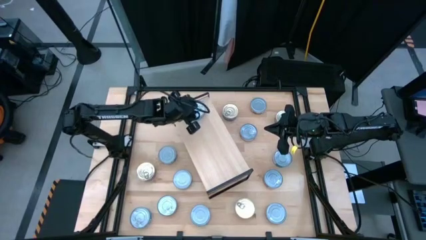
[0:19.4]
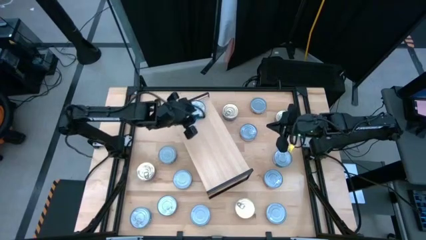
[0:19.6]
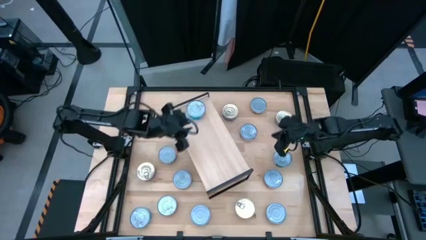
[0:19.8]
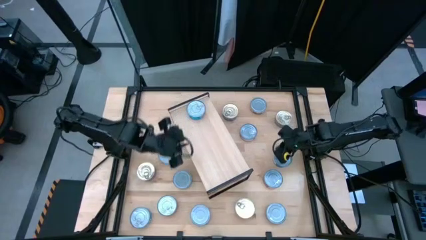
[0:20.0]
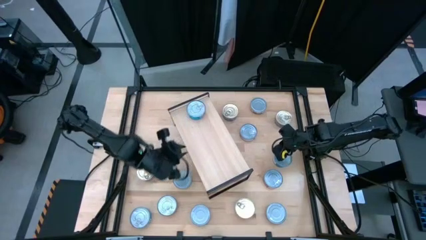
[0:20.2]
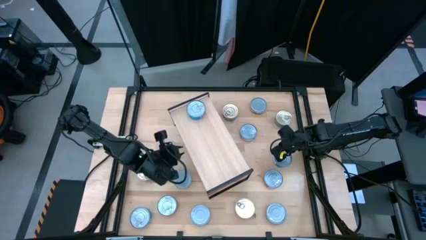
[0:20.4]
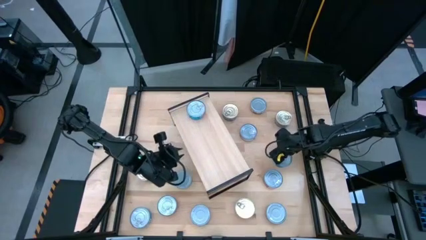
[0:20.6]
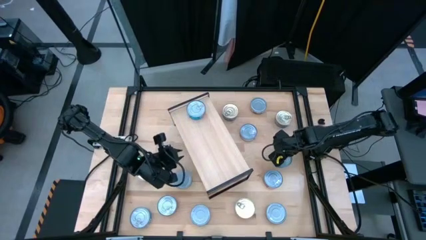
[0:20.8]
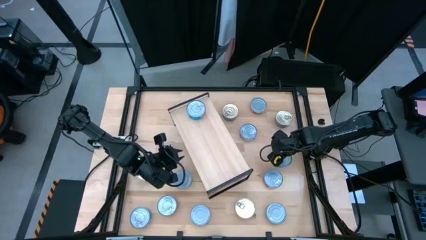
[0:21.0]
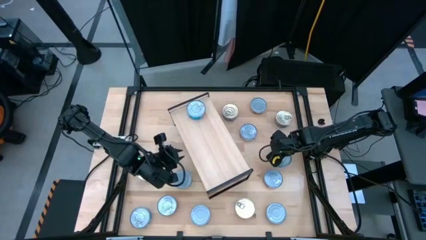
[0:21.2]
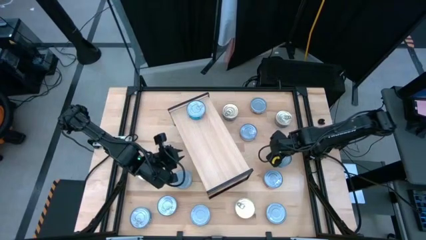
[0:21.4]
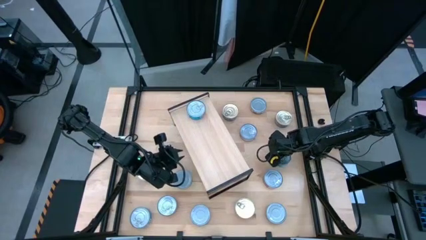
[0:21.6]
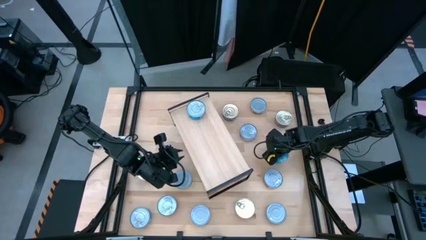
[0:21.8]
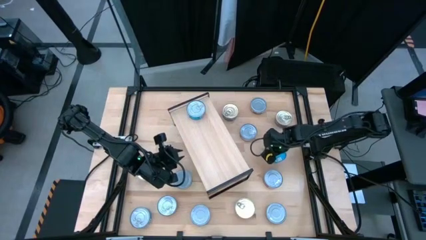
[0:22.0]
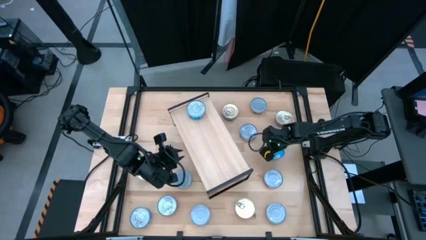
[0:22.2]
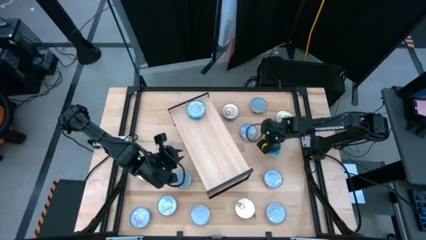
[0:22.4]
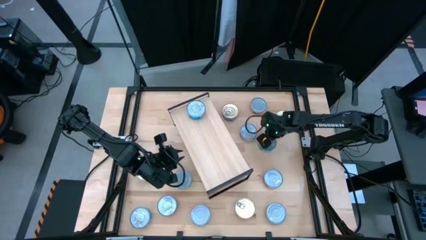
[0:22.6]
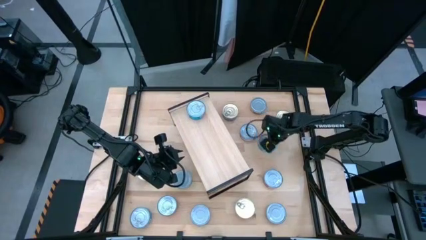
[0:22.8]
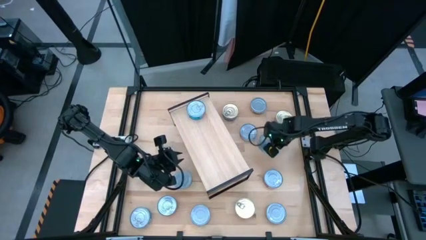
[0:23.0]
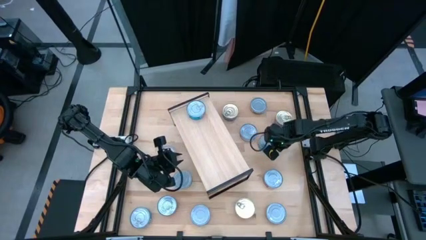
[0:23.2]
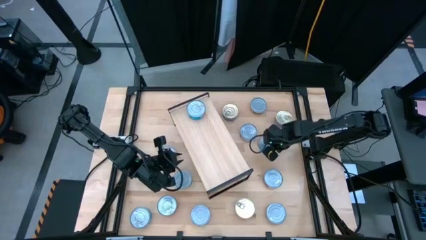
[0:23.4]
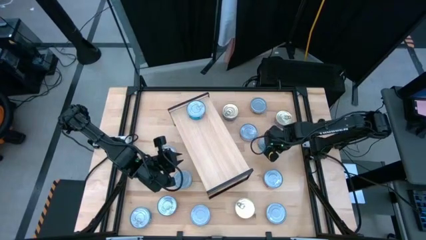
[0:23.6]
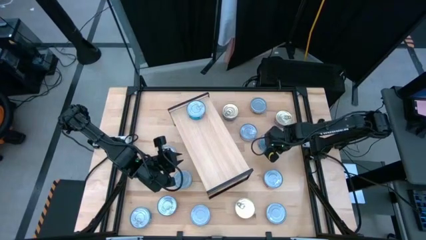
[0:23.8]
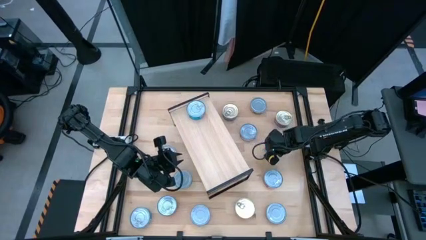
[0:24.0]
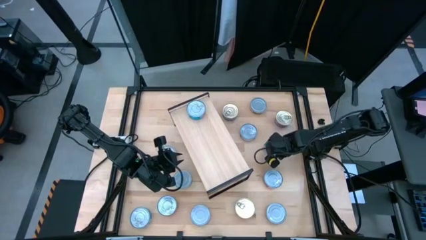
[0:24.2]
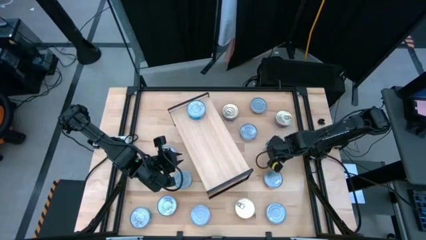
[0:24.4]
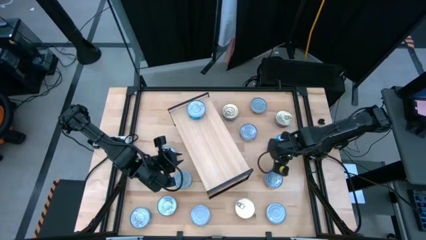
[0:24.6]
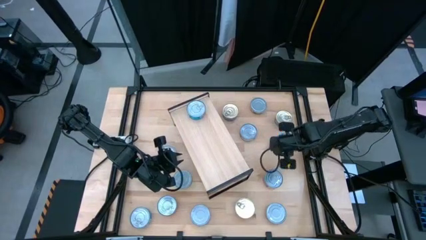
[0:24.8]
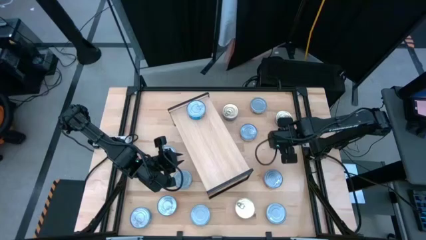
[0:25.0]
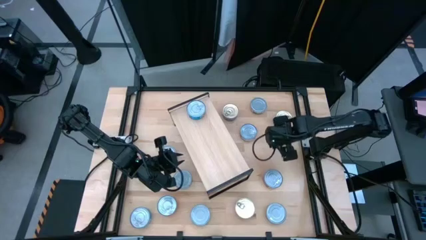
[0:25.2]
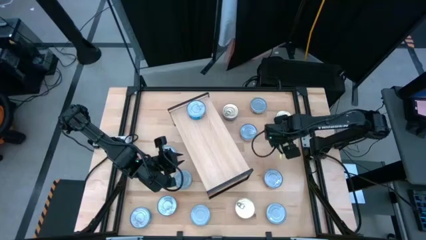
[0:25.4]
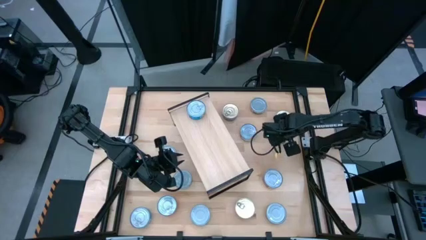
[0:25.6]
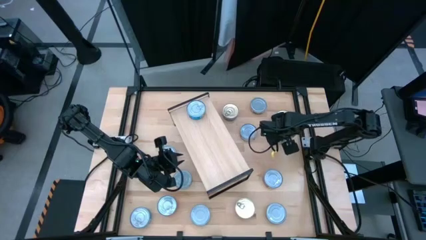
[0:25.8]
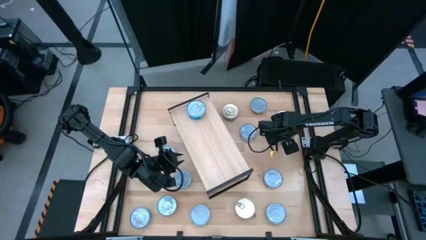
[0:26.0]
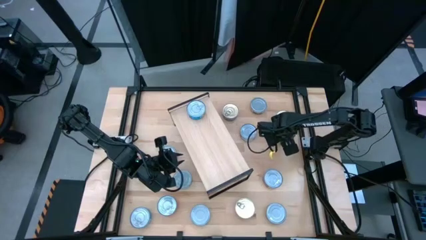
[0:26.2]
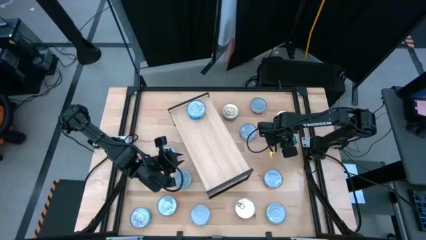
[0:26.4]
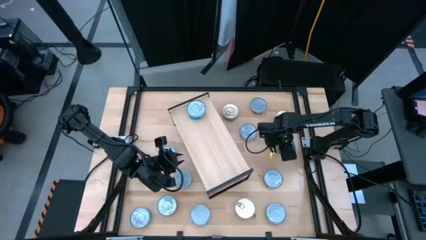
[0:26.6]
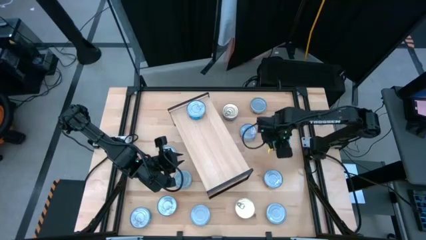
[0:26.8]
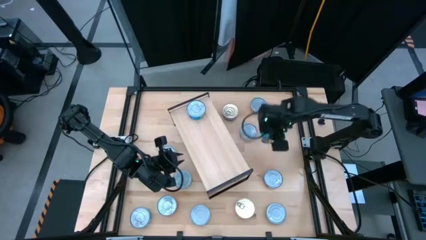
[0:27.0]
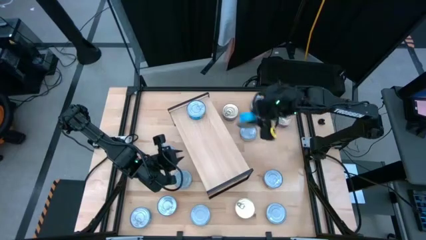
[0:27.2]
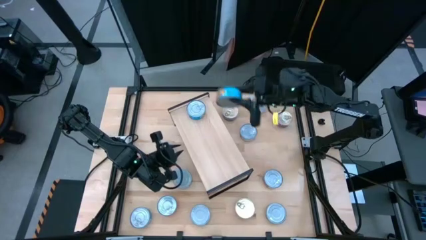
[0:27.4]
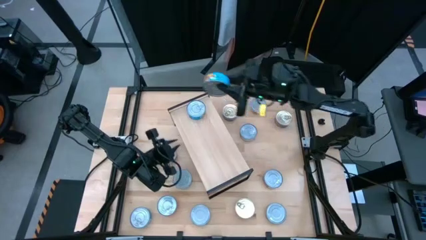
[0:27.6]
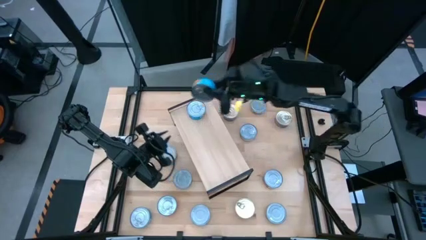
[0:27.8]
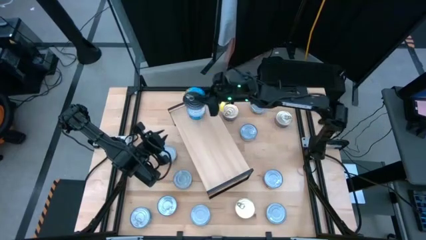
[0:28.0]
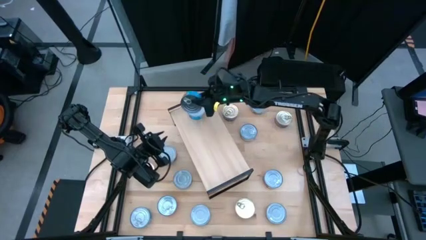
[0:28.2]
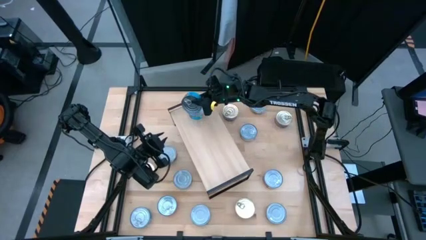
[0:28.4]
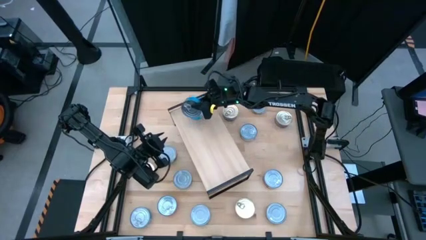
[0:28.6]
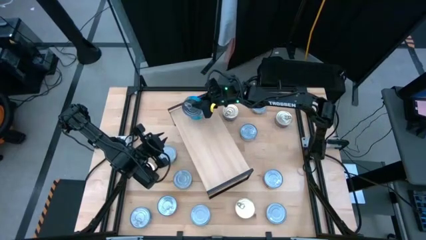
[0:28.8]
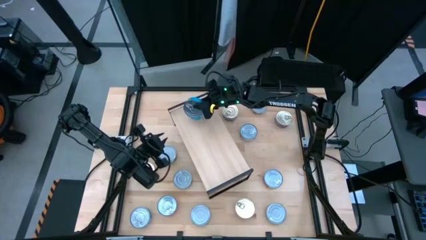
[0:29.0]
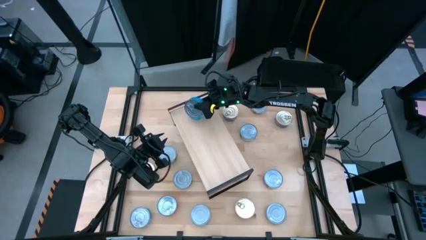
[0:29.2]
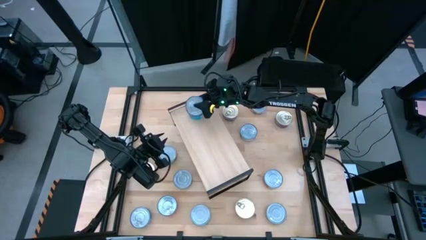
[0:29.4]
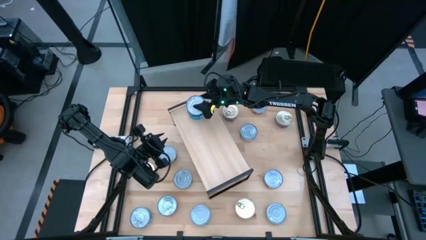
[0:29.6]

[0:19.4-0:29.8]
Task: Stack canned seafood by type on shelf
Stack the yellow-blue tuna can on top of the yellow-blue tuna can on the shelf

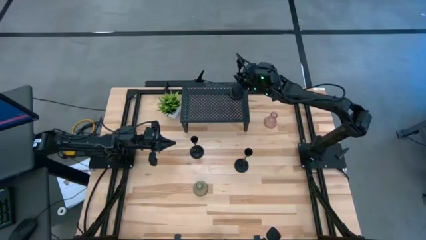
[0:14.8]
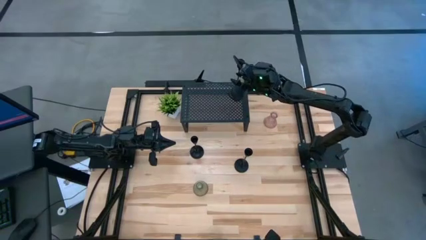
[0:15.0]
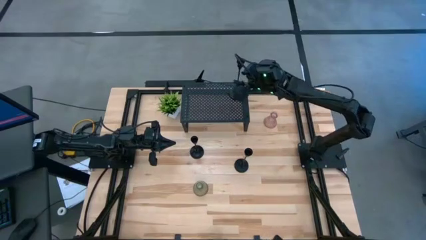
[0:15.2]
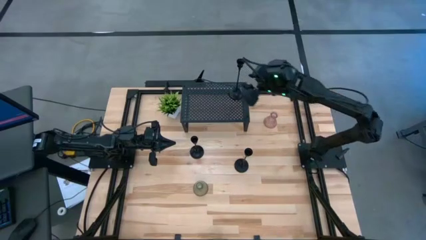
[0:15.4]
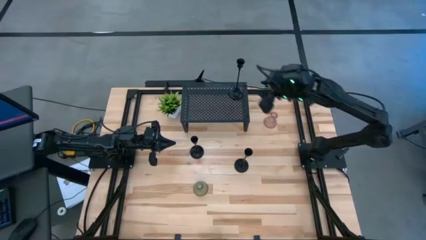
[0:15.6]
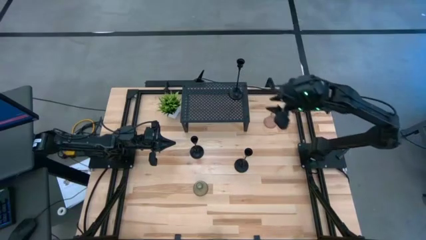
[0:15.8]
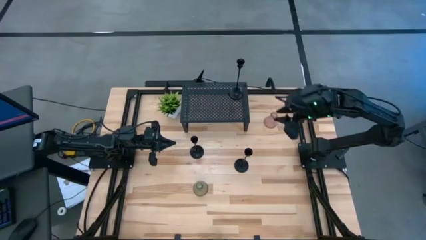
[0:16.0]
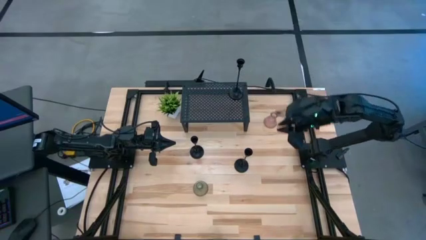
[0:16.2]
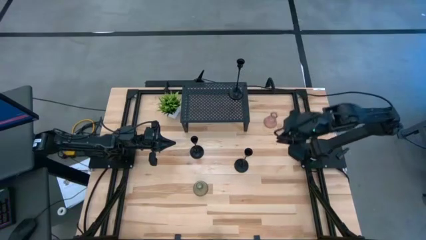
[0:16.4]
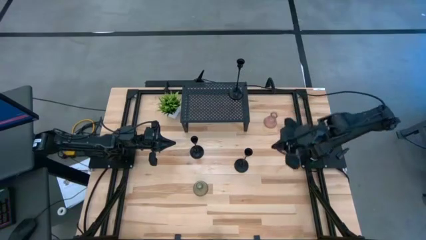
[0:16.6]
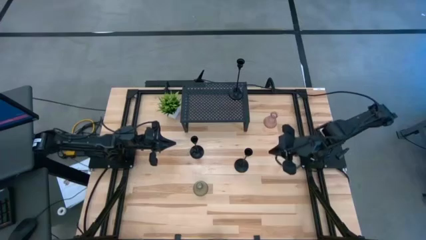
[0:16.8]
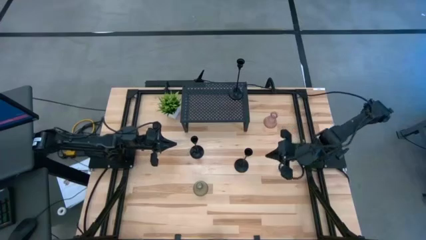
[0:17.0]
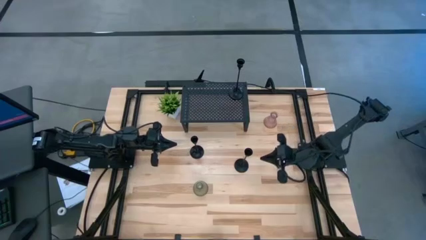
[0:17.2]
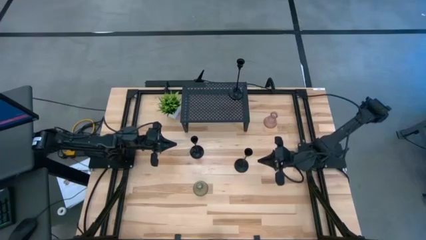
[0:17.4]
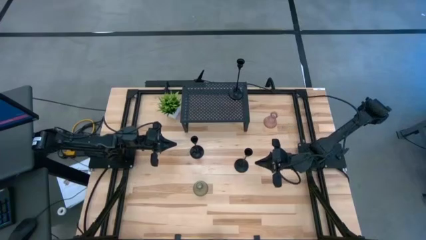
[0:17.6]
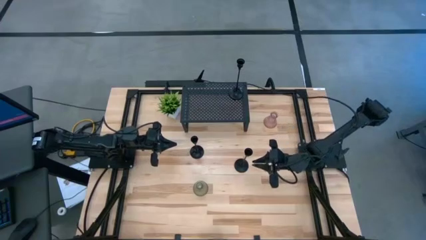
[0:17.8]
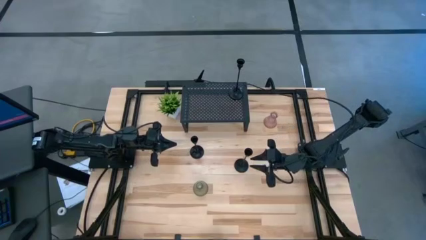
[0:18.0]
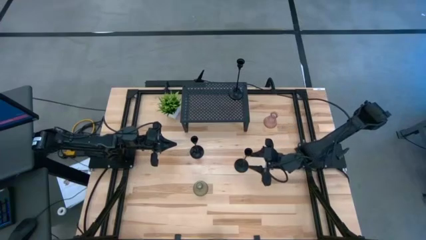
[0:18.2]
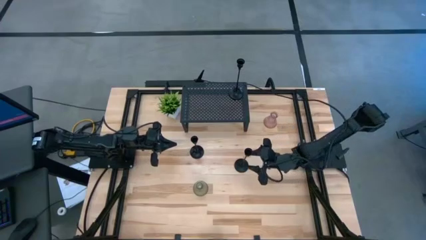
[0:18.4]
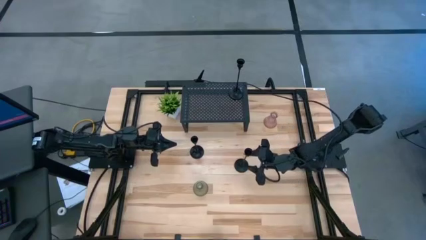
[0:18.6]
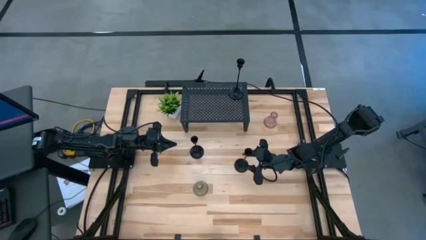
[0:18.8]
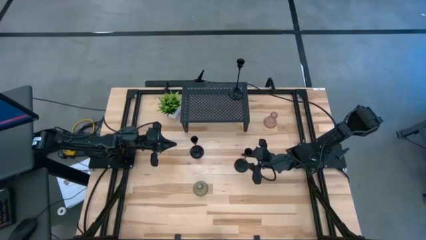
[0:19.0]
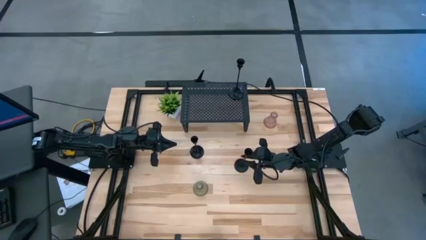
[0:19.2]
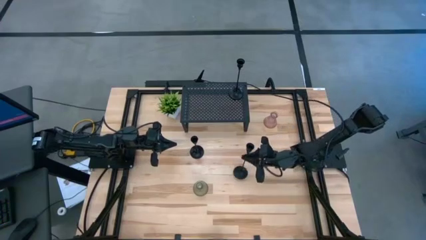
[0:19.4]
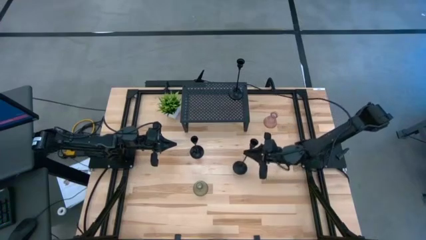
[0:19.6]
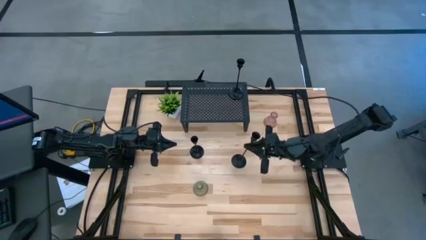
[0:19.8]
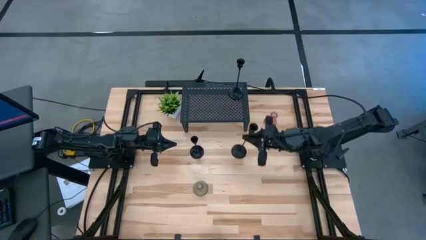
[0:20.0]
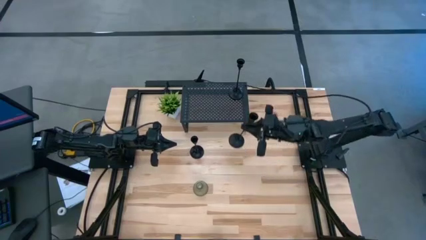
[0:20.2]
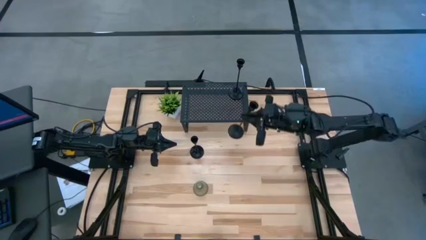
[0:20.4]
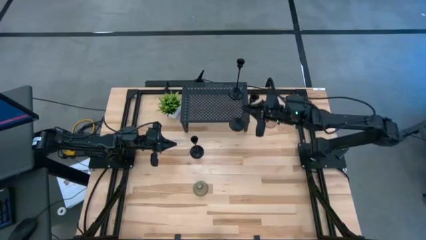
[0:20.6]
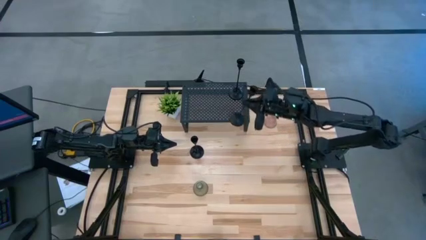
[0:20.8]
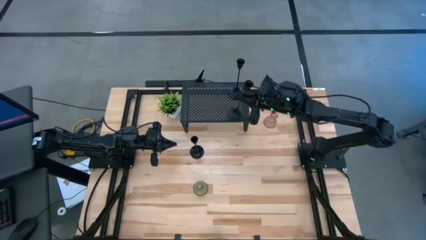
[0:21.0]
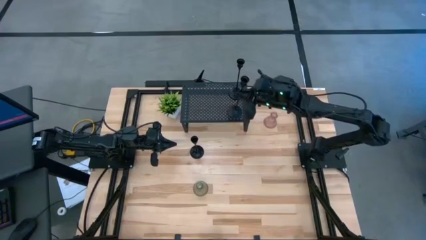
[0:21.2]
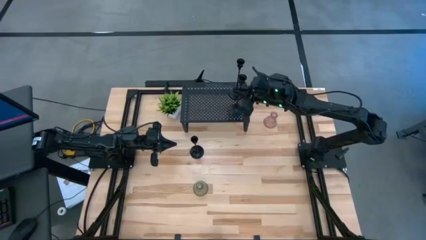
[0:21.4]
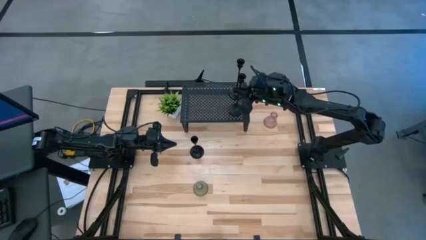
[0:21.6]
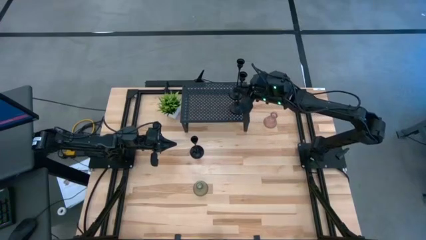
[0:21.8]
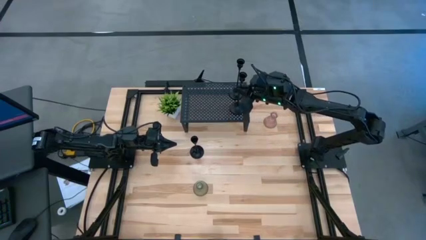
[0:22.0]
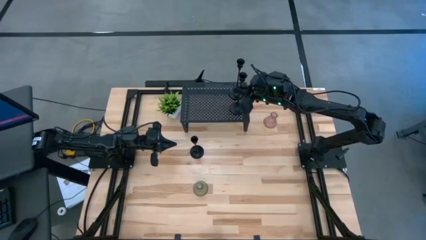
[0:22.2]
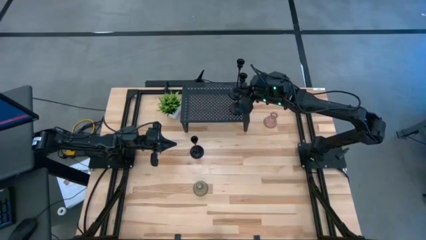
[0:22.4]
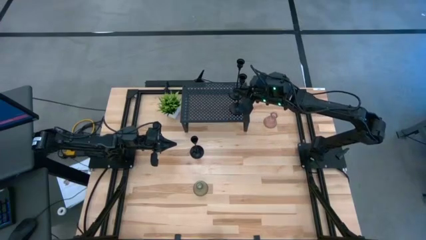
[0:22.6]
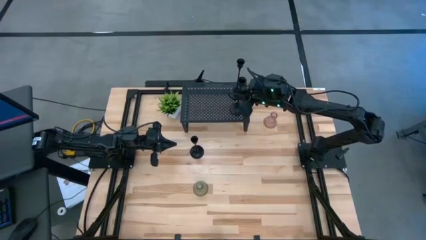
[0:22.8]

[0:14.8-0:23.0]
Task: Pick & Place candle stick holders
Align the black candle holder with the other black candle holder on the shelf
